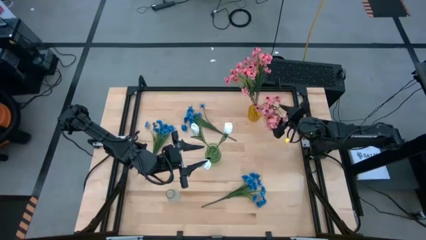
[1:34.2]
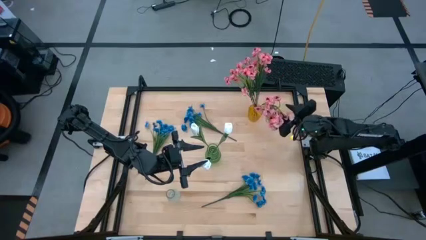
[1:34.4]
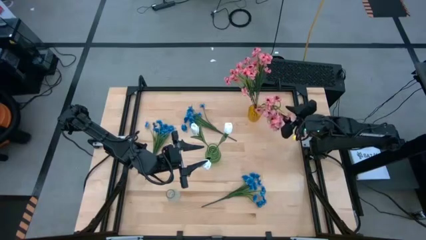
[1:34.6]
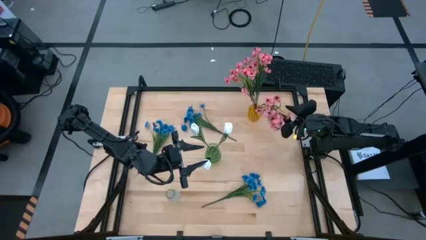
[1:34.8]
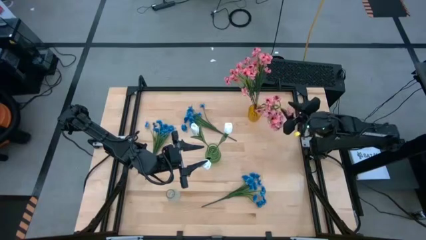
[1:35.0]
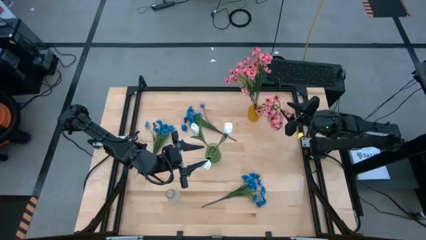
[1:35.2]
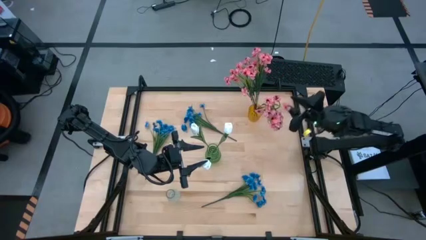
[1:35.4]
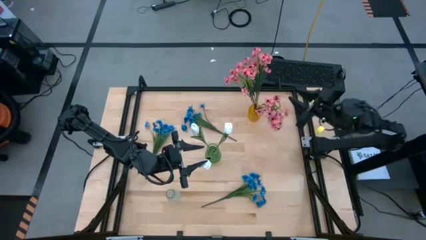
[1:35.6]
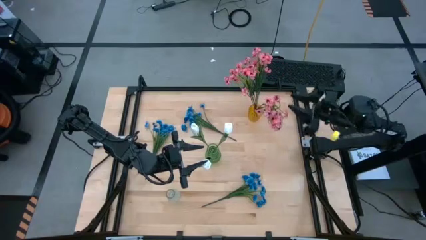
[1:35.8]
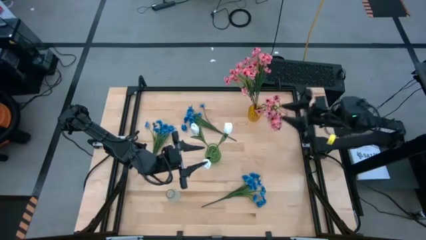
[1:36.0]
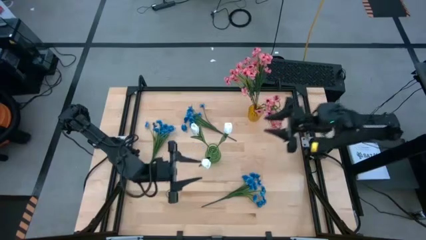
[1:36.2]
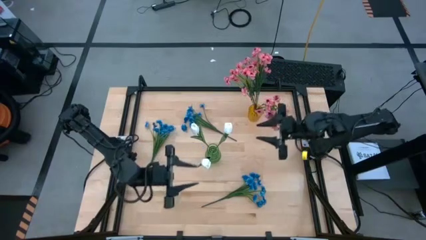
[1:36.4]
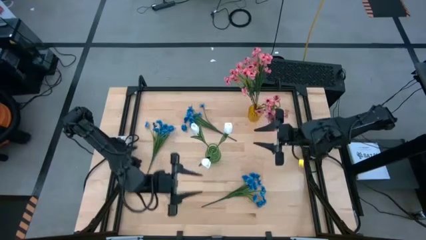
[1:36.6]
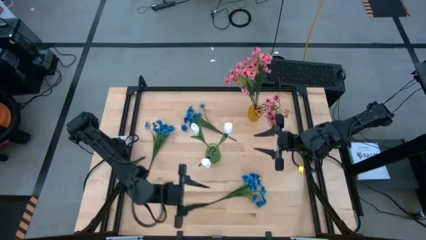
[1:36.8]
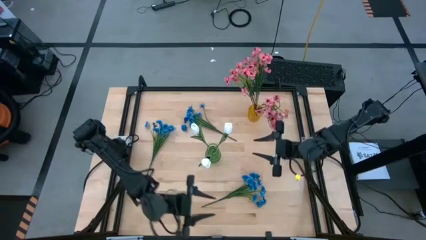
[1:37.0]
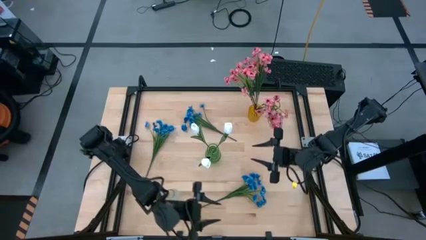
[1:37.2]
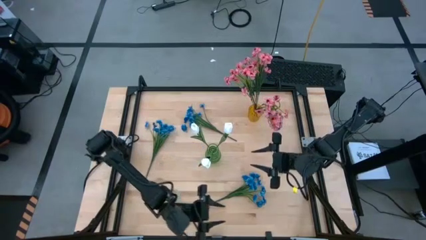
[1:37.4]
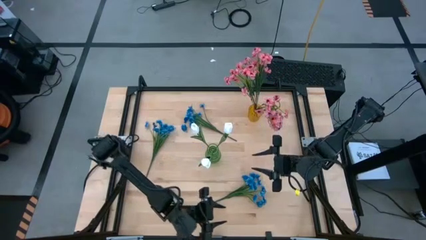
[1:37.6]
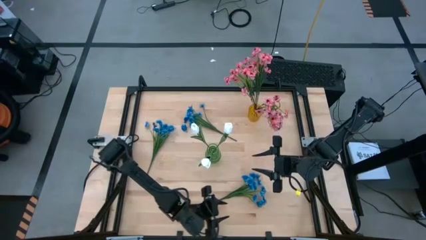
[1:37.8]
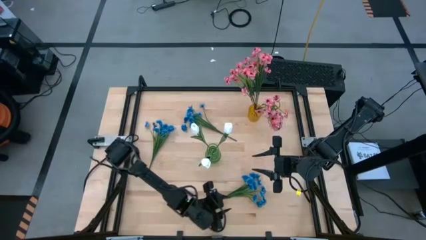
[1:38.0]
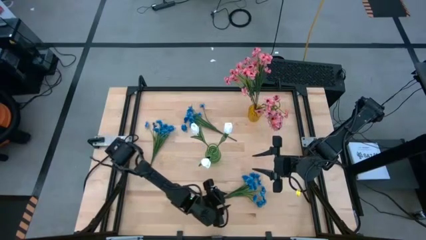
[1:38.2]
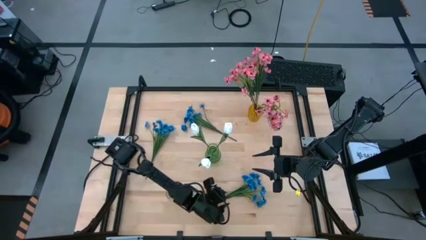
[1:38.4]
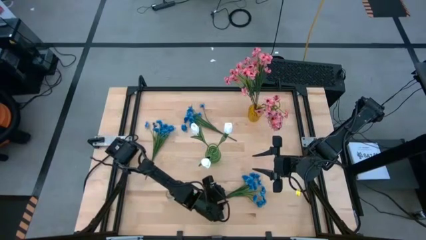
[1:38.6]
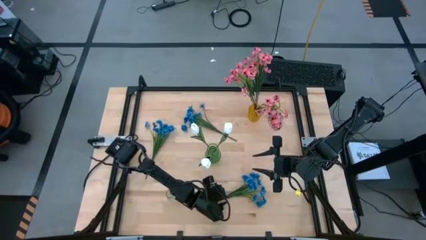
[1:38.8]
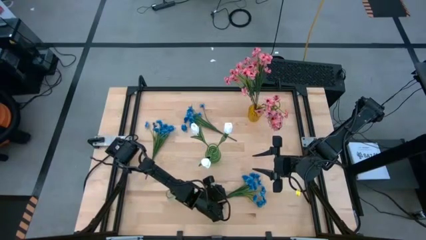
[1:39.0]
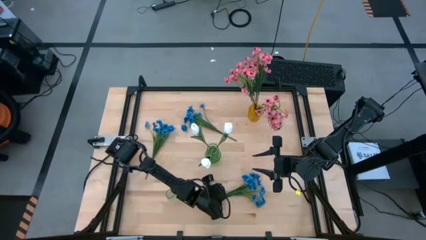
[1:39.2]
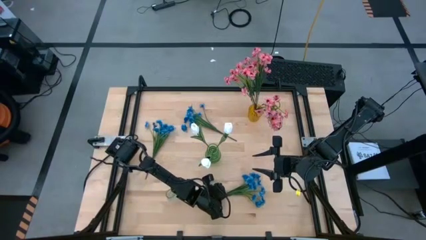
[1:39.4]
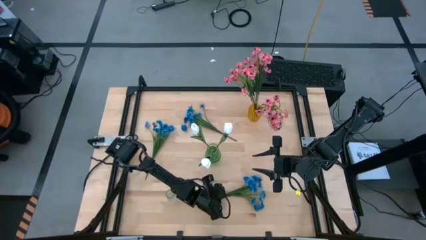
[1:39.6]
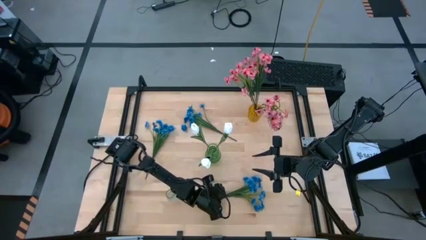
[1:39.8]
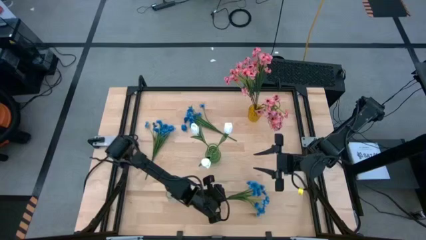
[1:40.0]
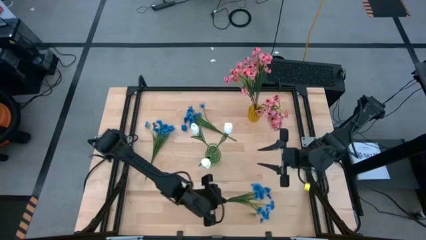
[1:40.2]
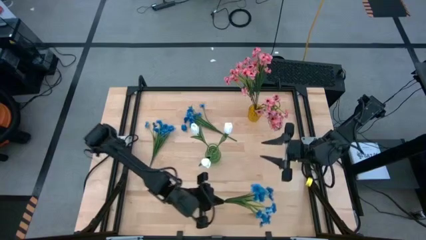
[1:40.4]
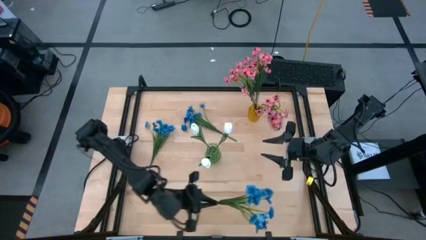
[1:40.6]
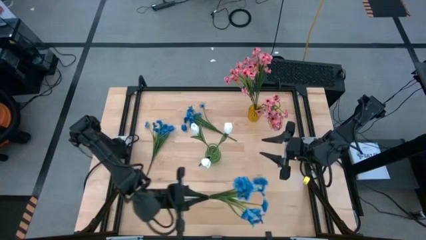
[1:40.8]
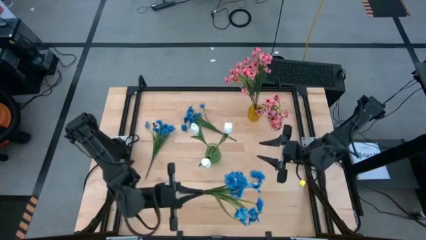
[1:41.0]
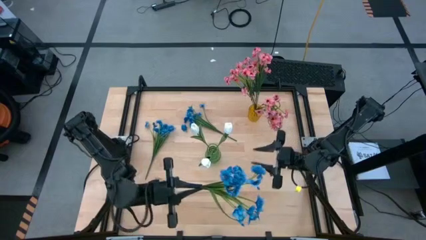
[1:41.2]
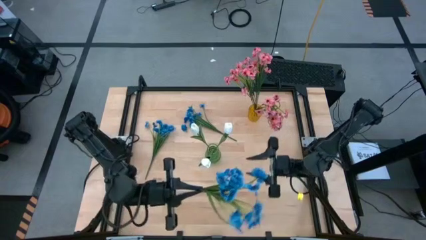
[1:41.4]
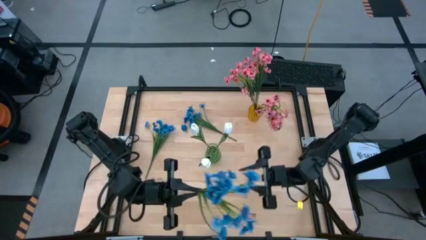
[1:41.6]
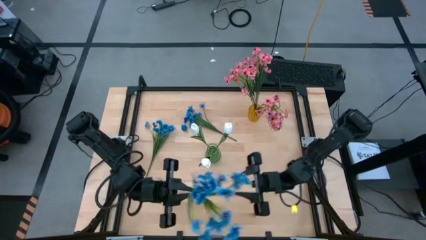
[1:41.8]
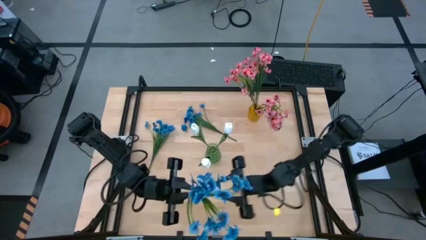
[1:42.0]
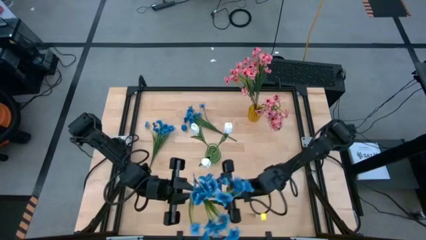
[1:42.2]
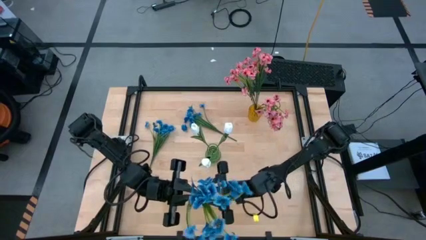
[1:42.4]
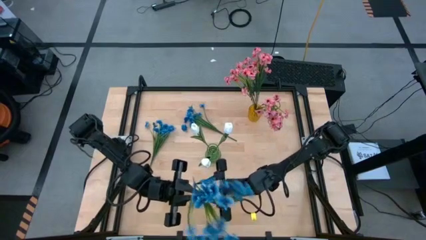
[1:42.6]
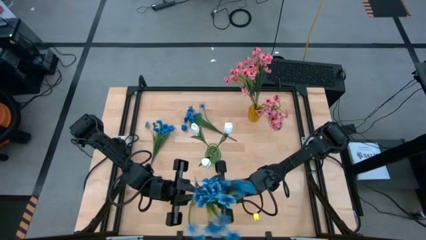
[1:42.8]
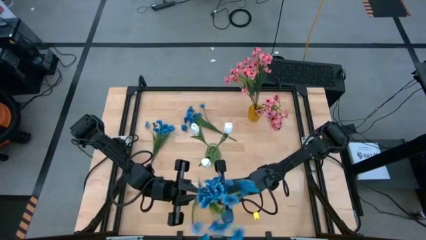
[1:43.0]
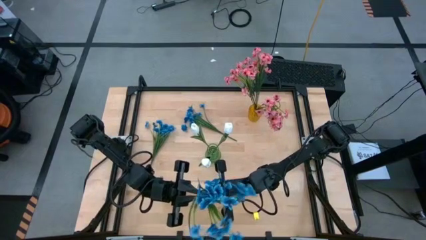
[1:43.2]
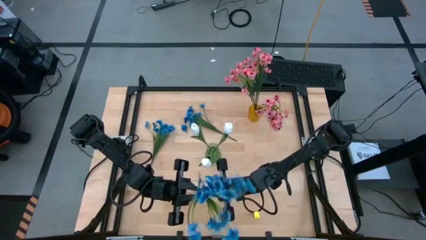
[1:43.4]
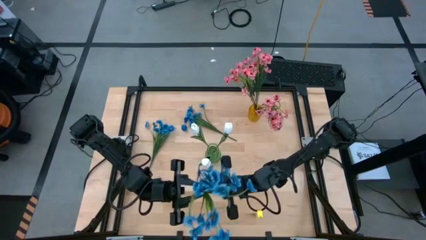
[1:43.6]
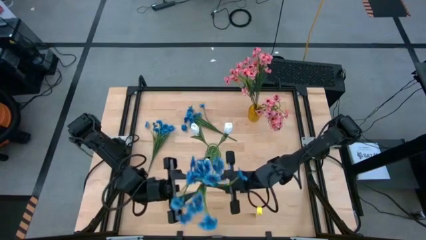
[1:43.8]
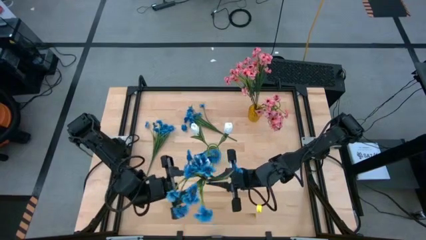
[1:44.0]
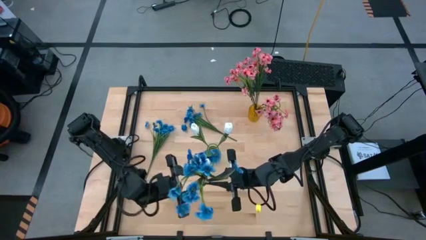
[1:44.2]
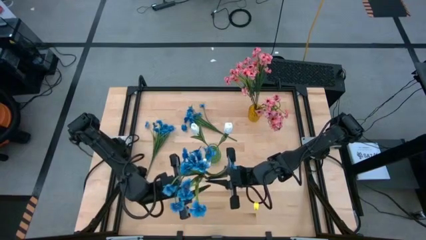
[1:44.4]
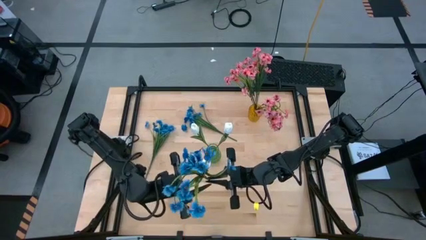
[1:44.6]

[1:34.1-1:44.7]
Task: Sort flowers into vase by color
Put the bottom blue flowers into the transparent vase
